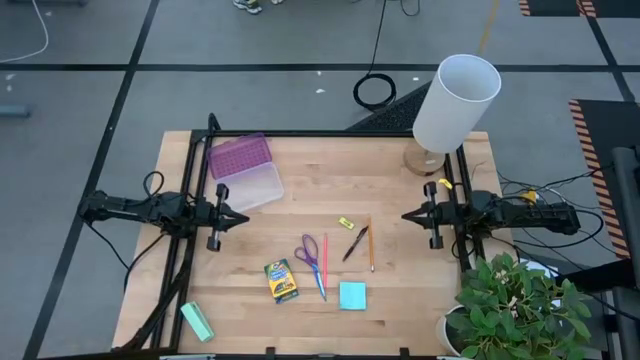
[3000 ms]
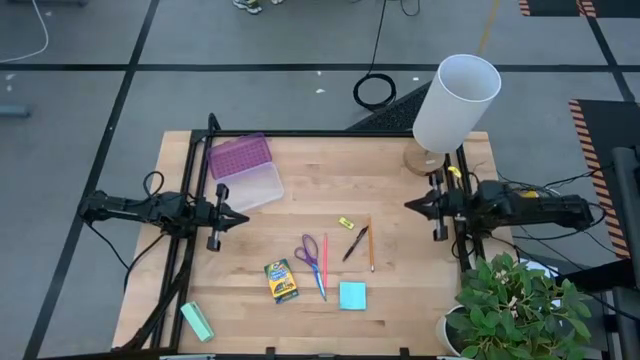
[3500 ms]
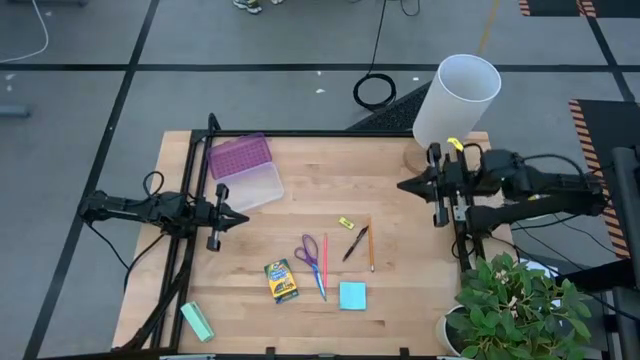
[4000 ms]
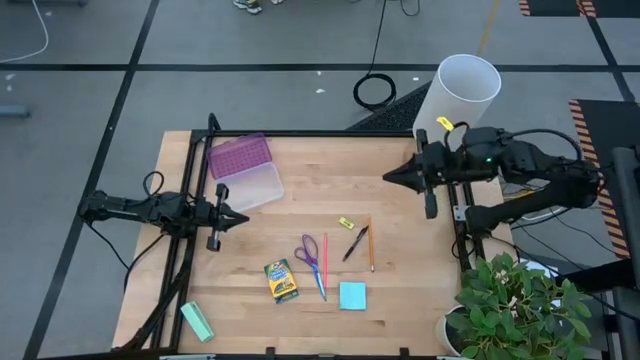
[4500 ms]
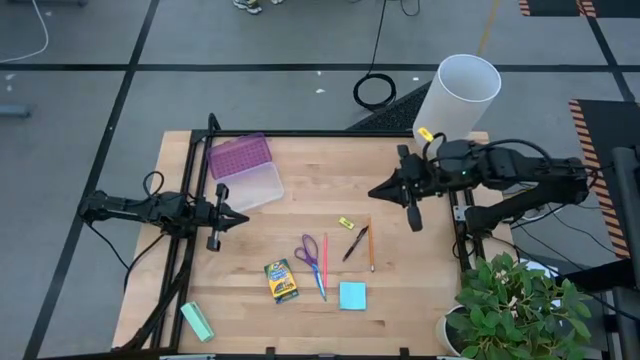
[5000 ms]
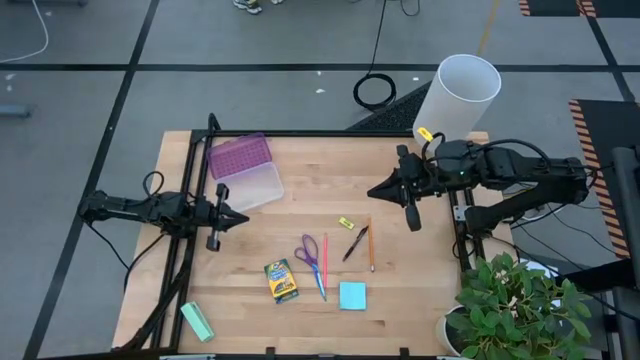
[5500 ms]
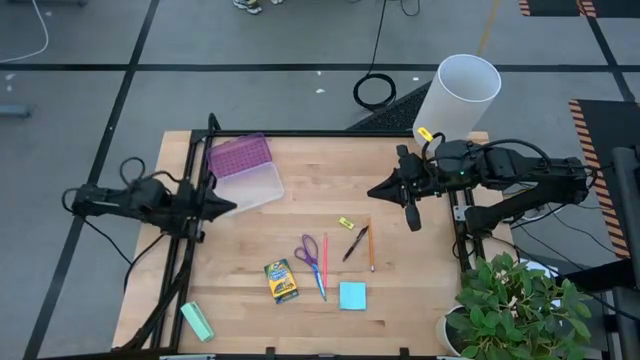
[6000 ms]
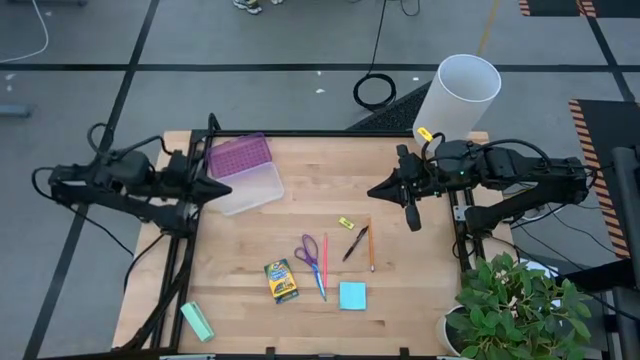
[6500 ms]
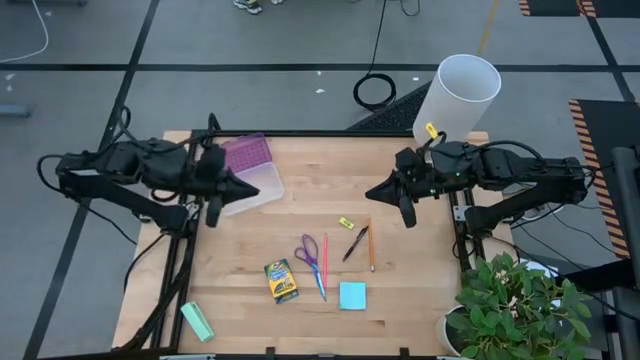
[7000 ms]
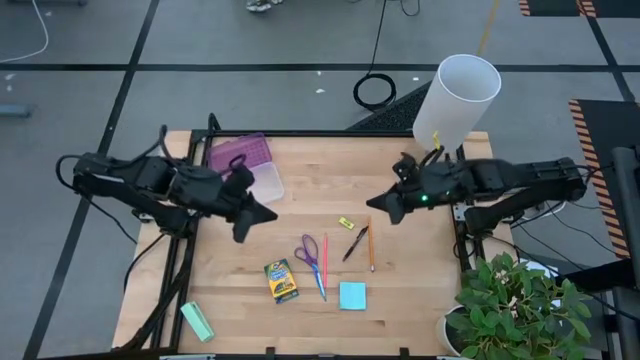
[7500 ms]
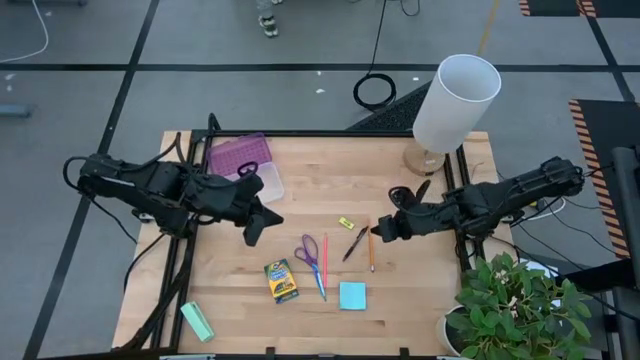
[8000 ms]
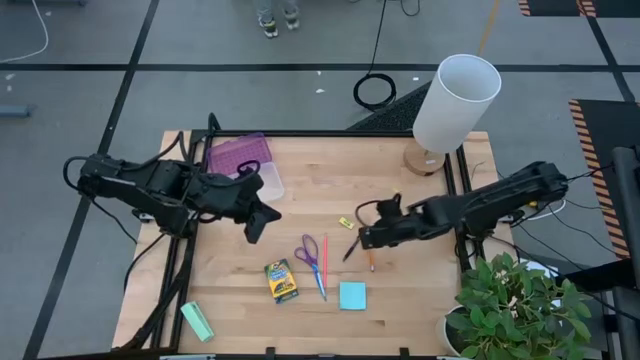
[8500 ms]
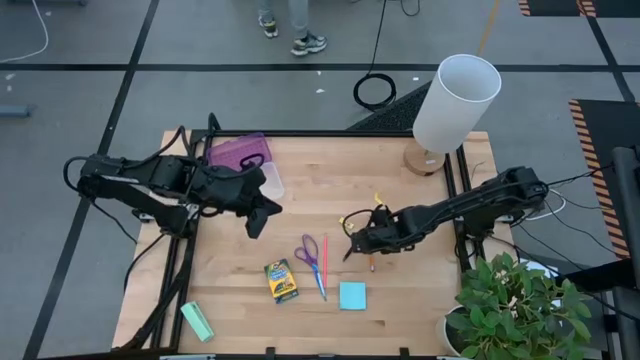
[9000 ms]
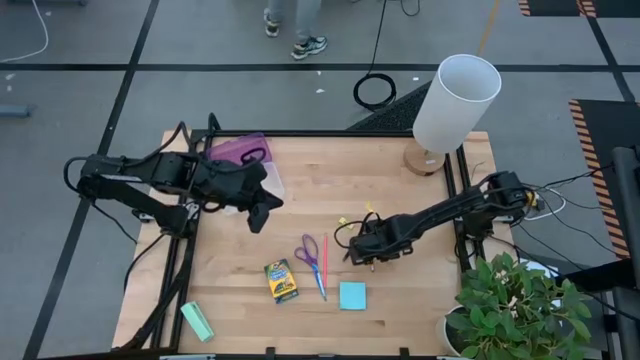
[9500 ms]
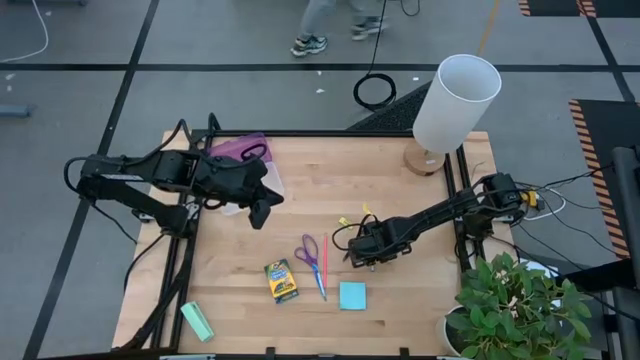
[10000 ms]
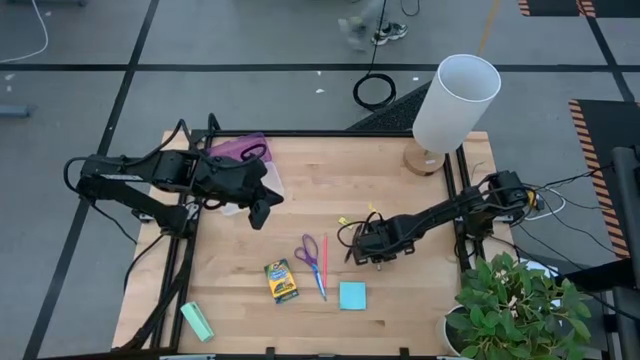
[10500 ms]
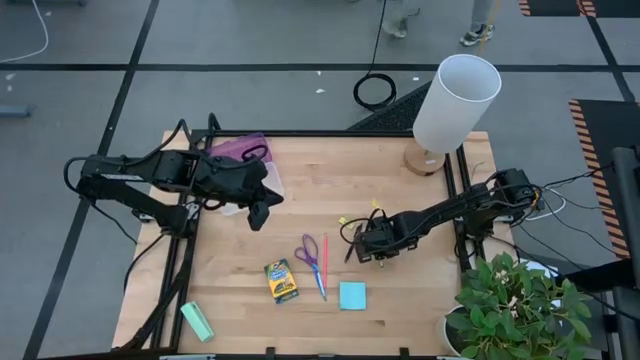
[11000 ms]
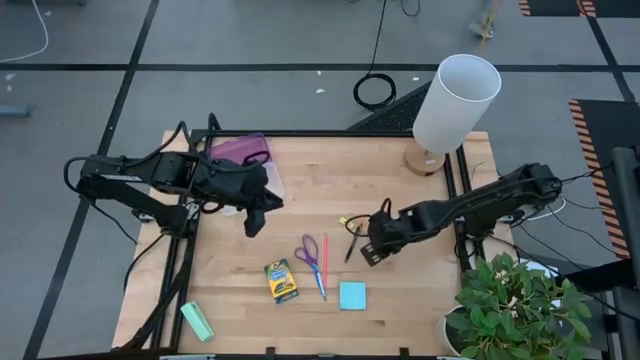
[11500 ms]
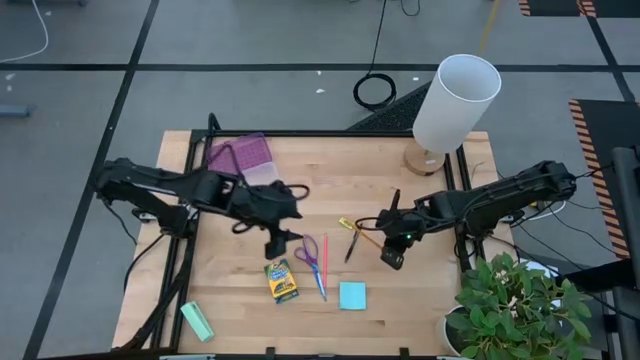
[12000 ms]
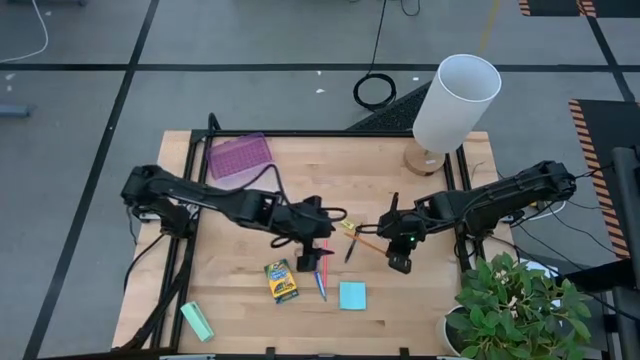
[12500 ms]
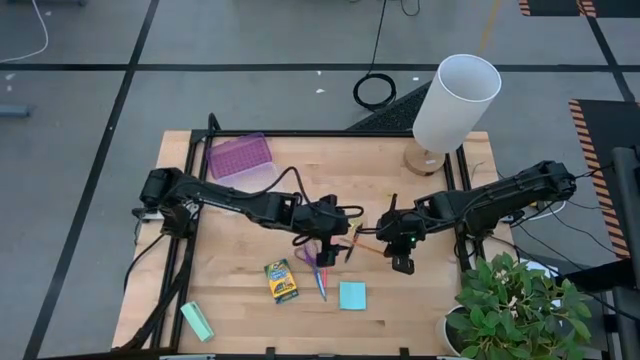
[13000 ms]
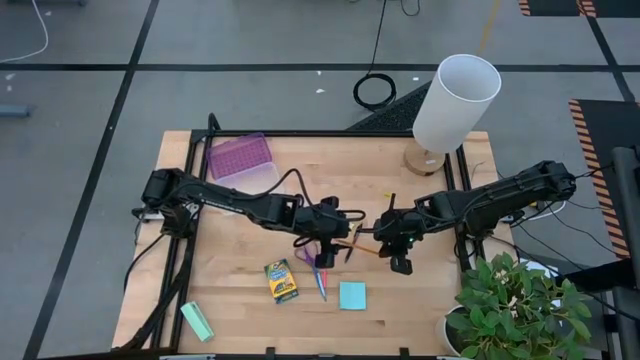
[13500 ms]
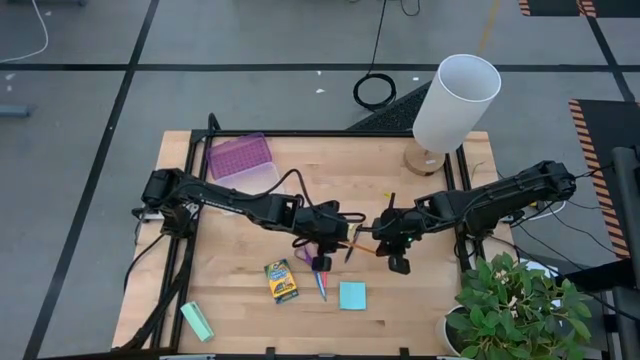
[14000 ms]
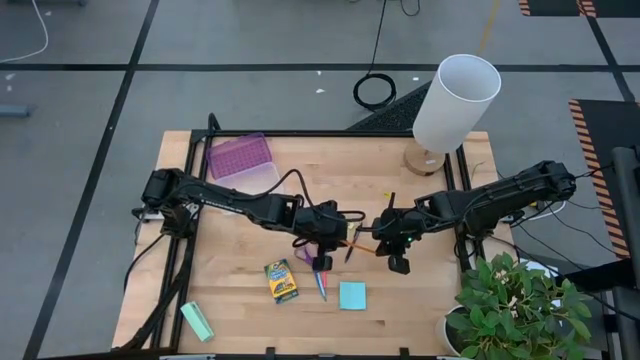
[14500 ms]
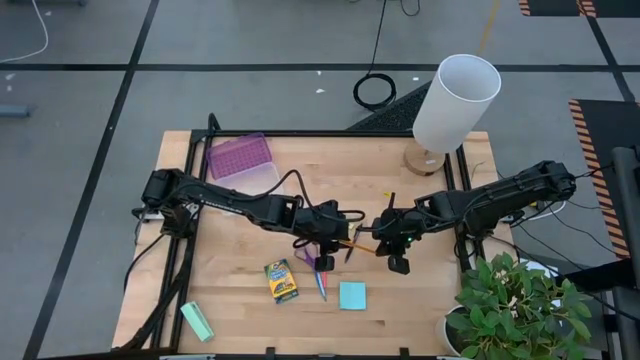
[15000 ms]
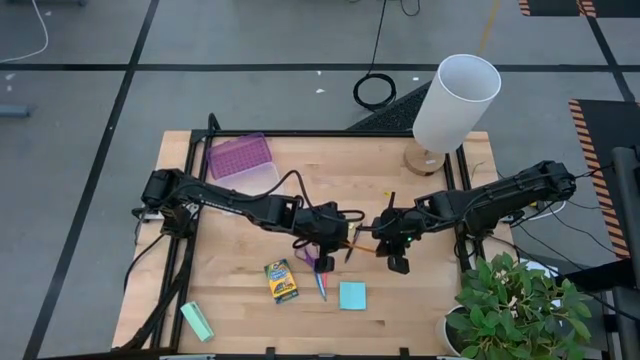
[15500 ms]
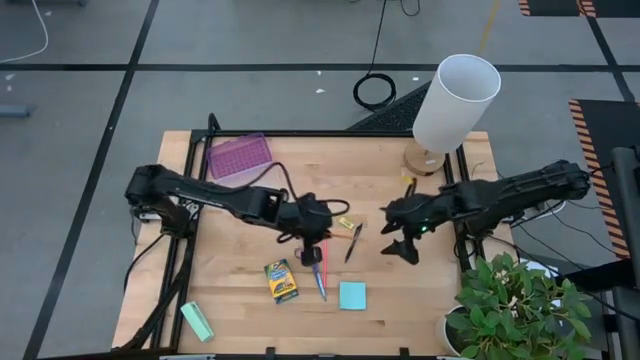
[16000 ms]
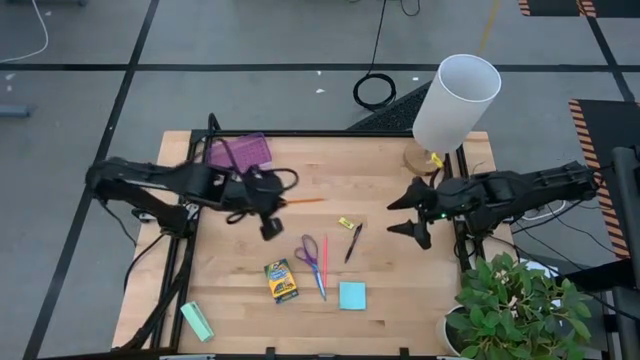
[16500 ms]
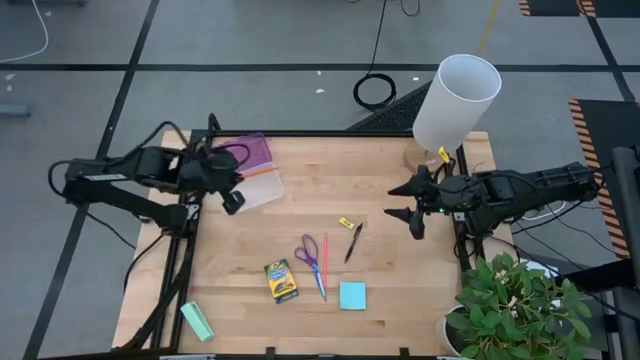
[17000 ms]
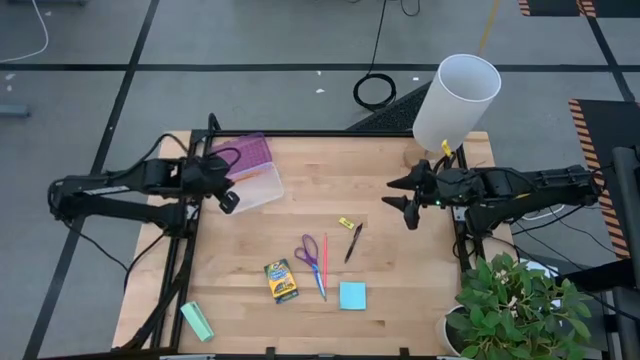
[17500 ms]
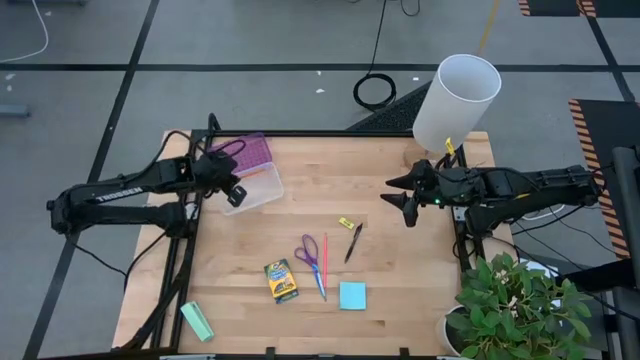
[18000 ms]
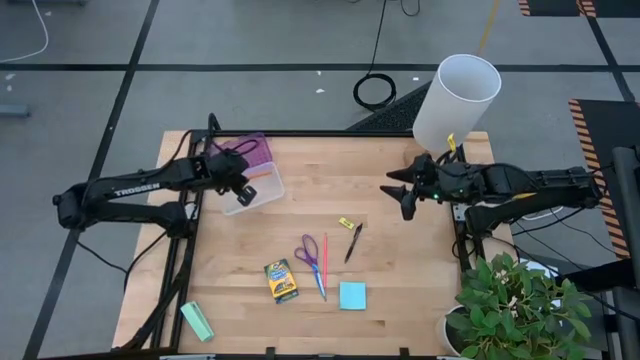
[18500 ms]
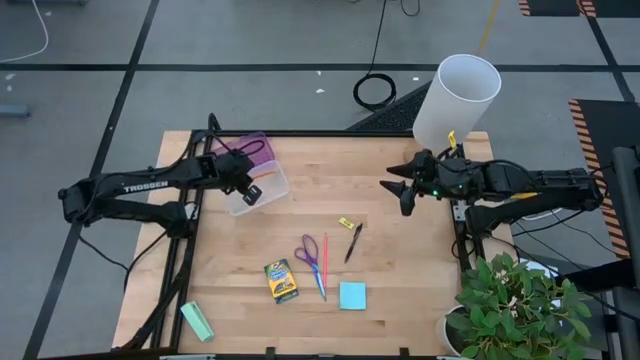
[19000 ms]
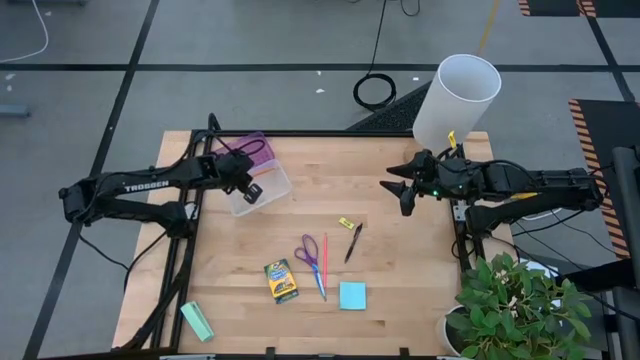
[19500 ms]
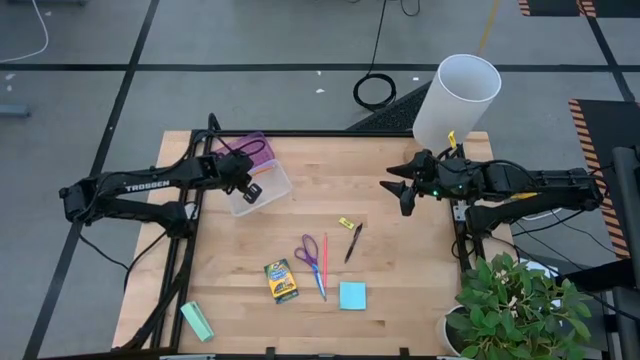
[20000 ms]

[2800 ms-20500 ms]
Task: Pack school essentials
Put the orange pencil into the supply box
